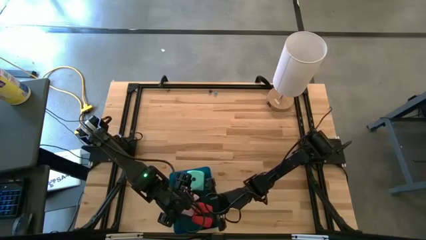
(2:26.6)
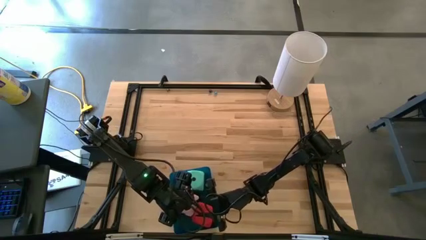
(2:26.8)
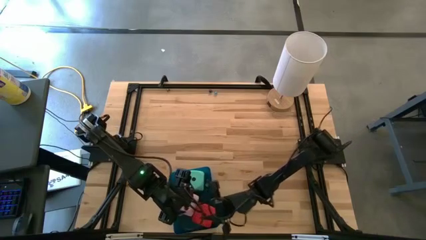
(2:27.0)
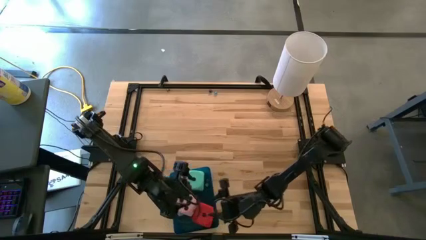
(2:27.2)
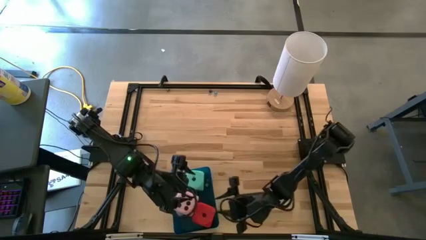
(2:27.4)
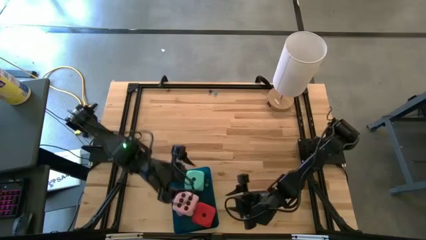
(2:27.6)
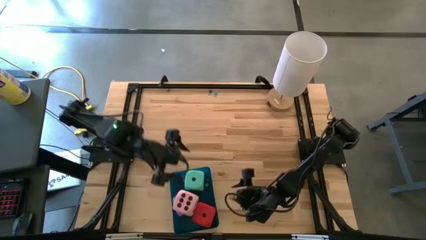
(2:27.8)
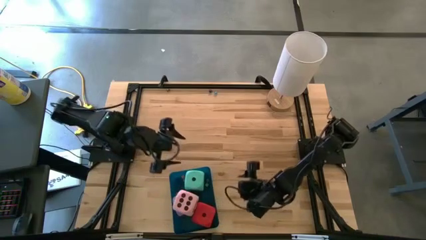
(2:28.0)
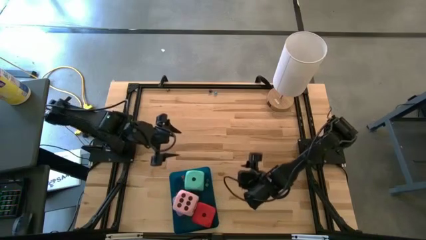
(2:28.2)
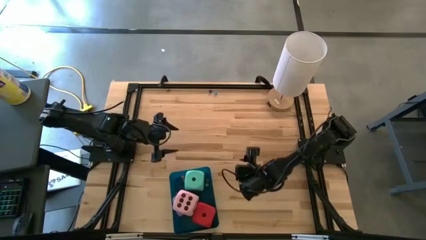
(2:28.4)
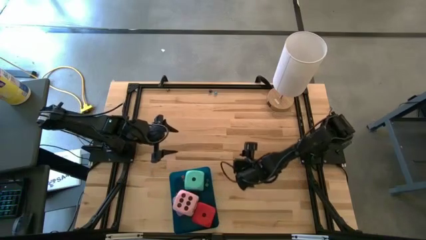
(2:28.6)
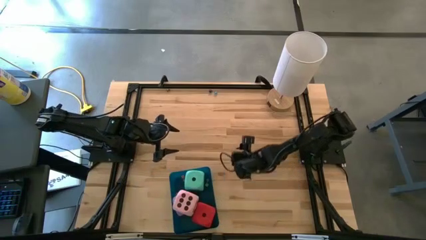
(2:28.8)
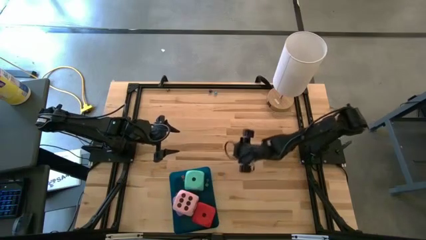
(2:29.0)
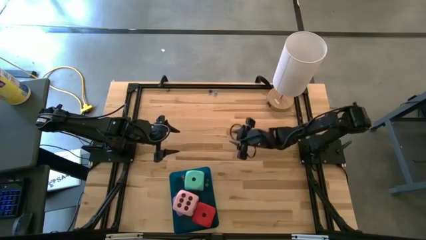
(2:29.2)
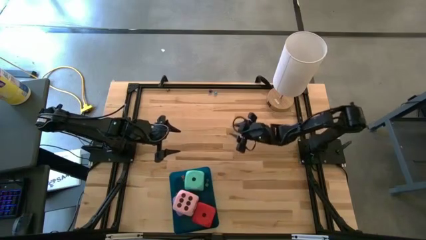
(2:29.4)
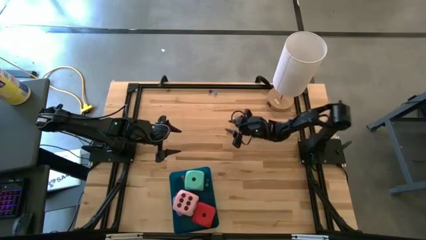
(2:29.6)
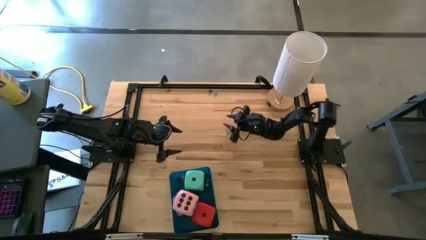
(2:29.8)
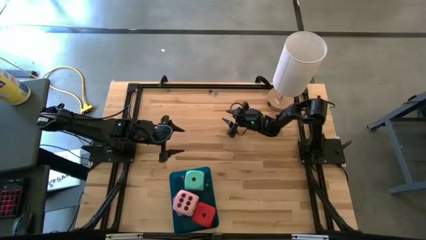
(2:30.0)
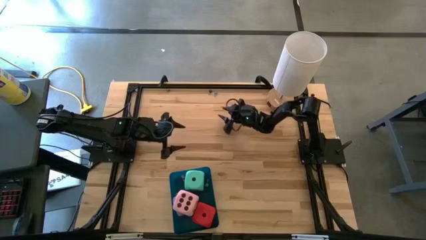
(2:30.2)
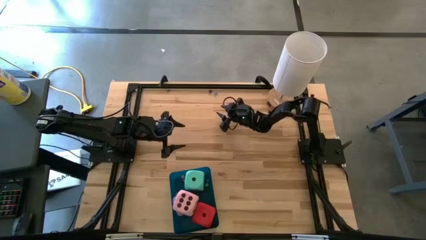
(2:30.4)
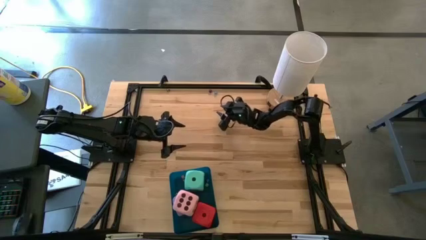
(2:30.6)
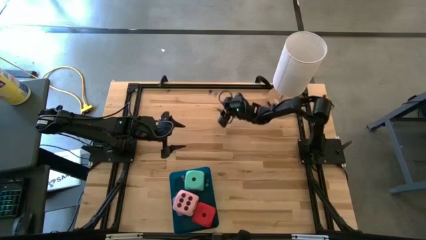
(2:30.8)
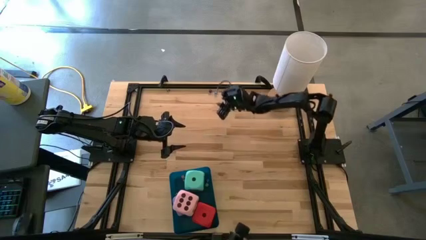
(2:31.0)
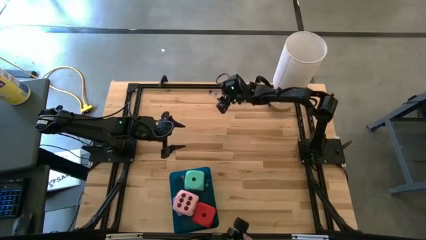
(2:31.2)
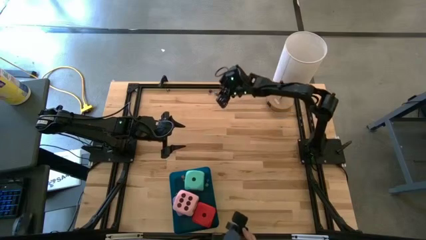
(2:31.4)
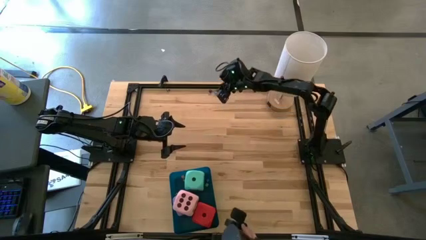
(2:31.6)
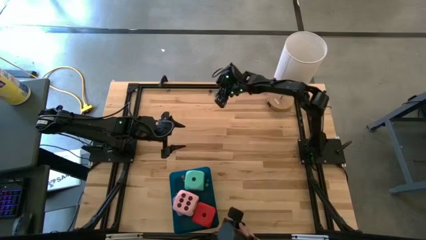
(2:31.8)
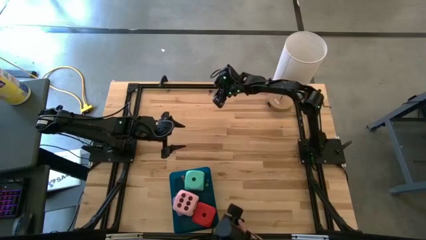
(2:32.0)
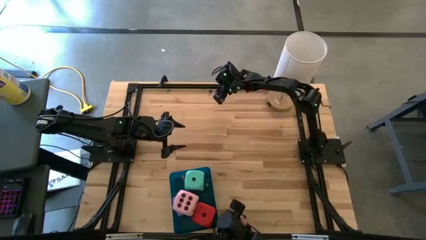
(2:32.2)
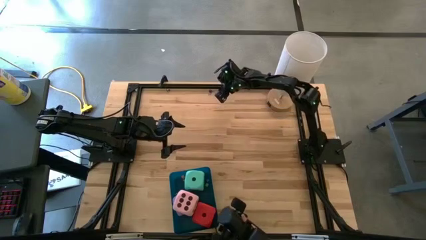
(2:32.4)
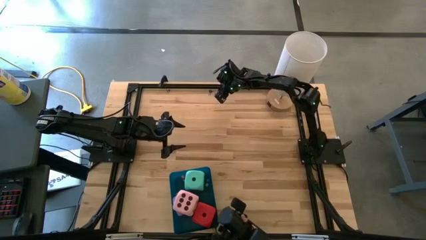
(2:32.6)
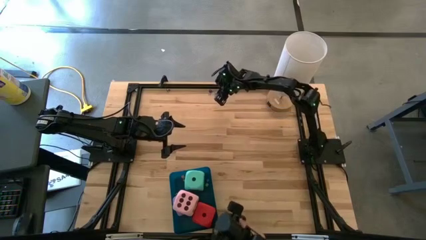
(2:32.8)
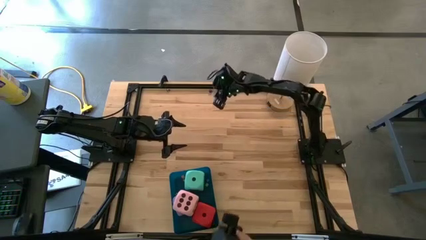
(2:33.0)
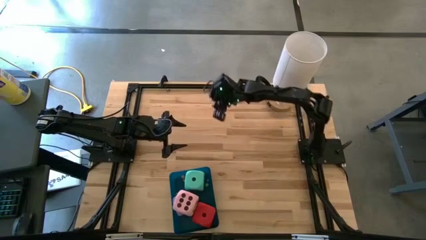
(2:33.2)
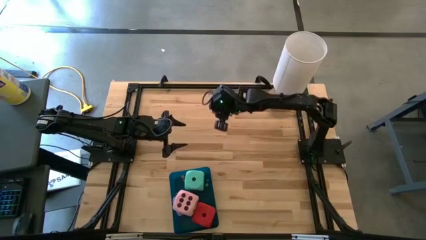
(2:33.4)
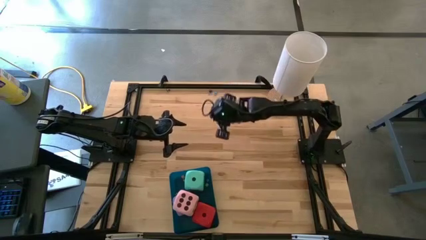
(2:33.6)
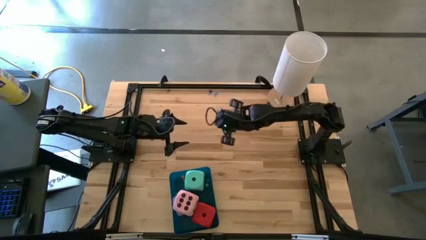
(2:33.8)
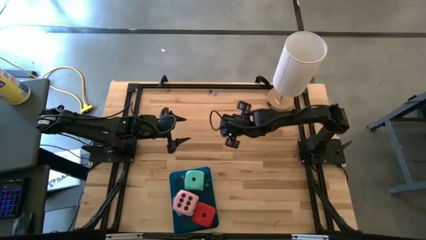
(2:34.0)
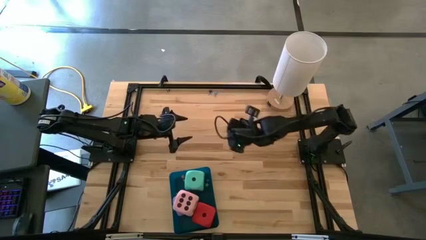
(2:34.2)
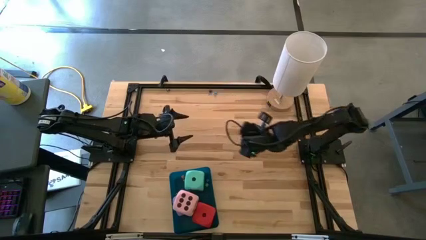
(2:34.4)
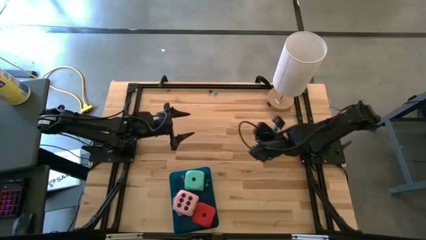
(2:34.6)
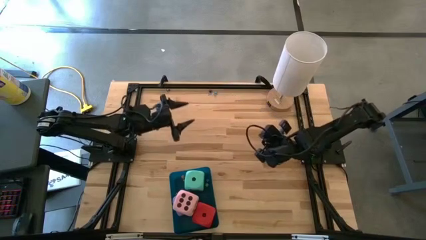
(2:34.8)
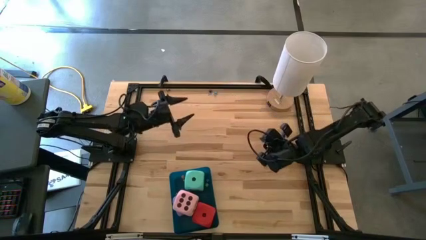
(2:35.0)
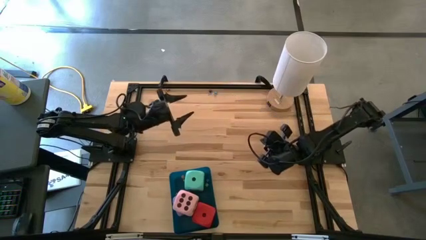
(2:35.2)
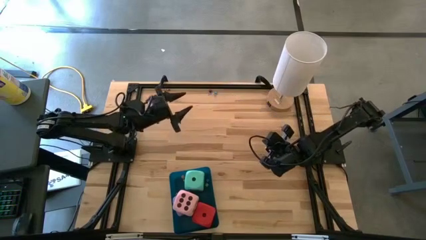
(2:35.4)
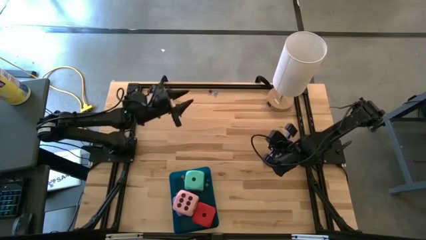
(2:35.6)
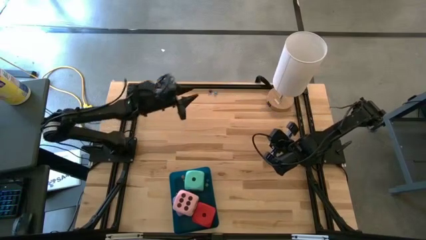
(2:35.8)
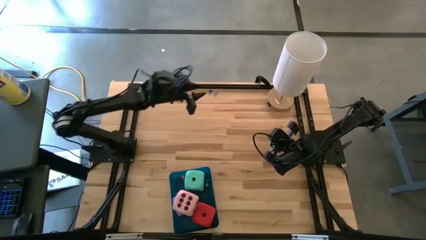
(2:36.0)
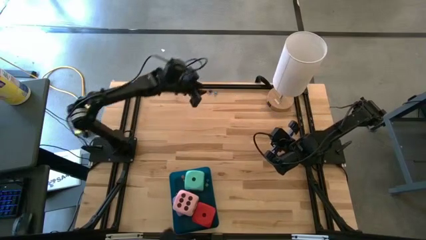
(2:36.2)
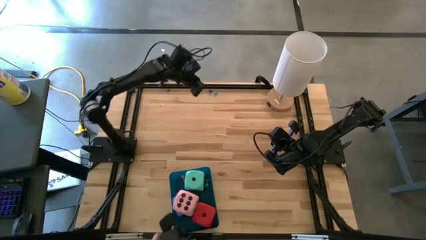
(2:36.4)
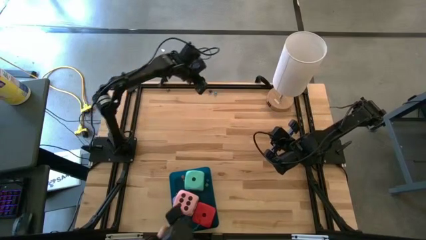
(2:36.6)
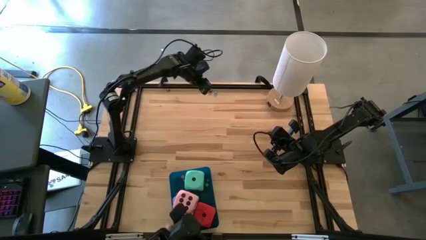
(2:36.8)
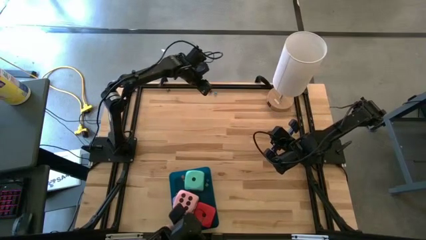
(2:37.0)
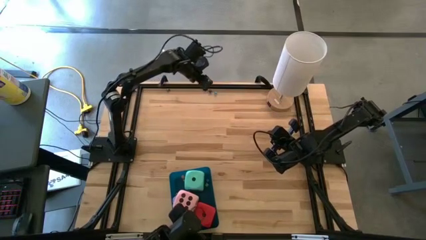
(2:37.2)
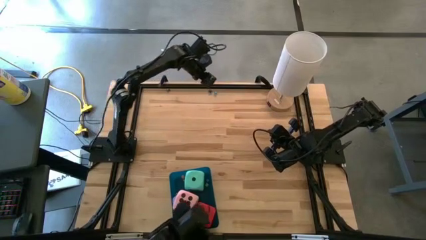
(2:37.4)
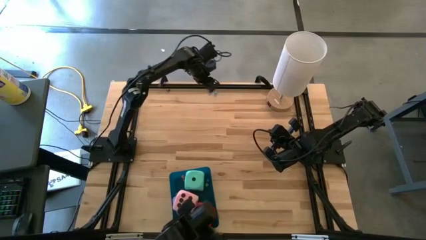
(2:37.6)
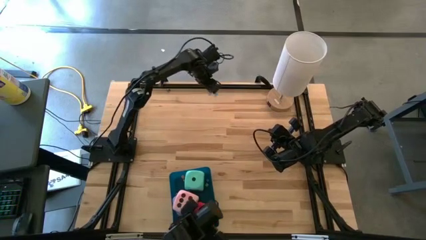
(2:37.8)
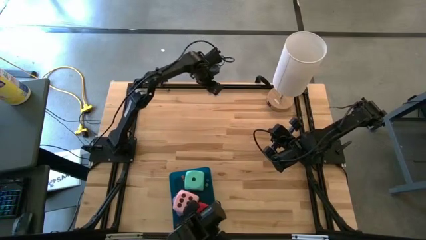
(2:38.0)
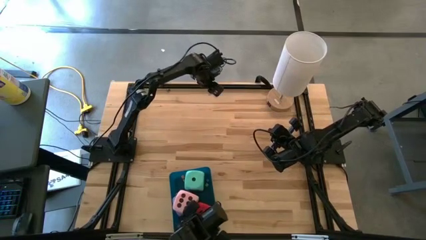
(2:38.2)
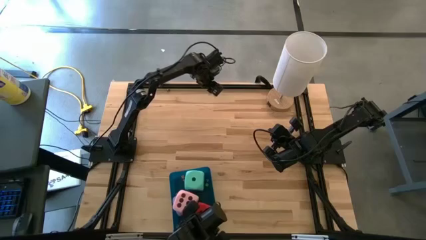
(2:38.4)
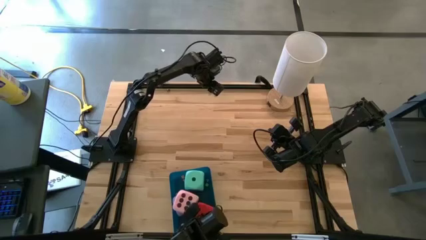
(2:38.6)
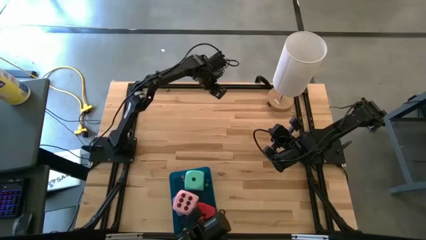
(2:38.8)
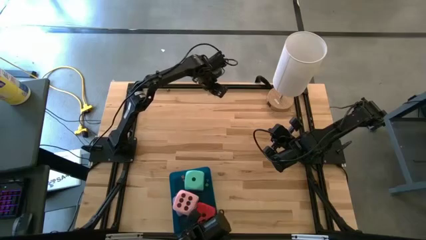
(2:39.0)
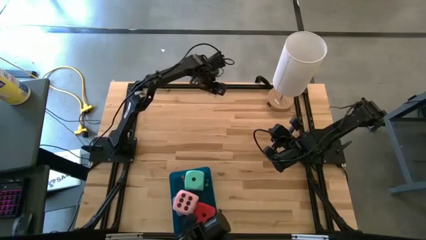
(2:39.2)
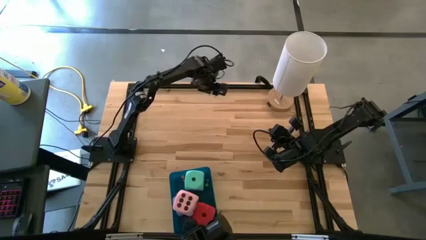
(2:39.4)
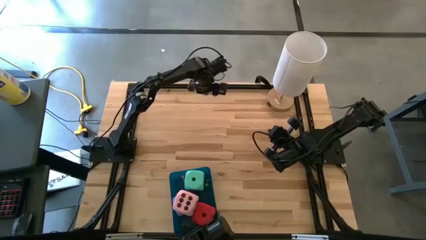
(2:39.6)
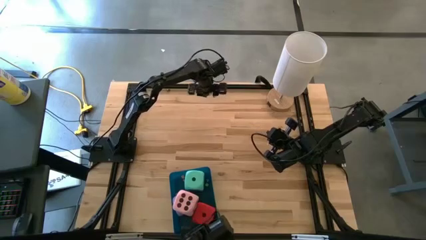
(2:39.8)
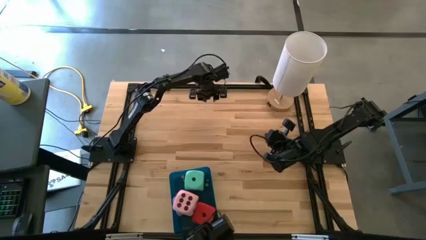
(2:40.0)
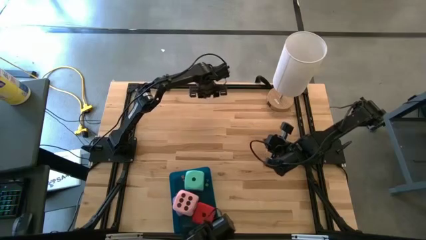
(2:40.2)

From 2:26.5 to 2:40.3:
Task: Pick & Place Dice
Put the small light blue die into the blue bin
